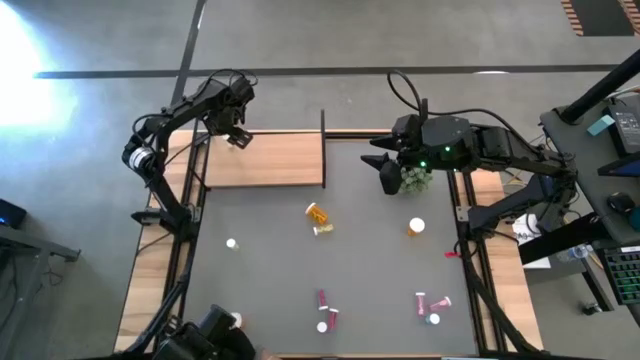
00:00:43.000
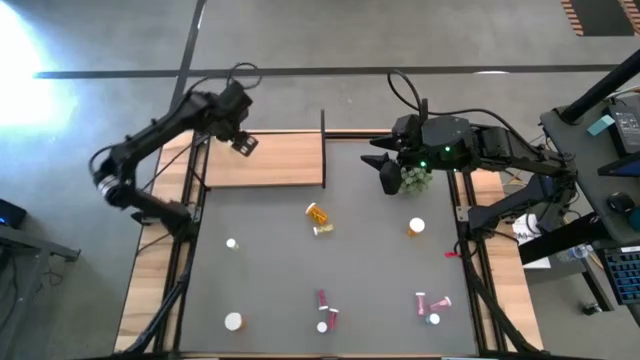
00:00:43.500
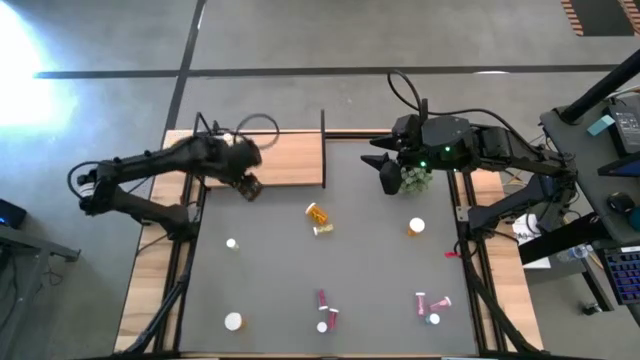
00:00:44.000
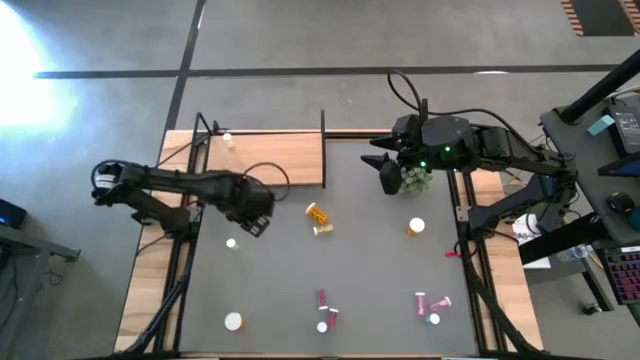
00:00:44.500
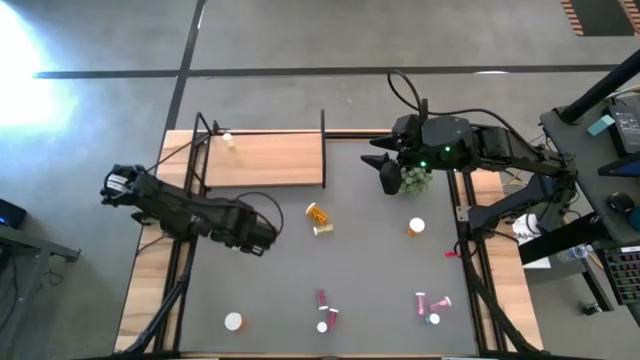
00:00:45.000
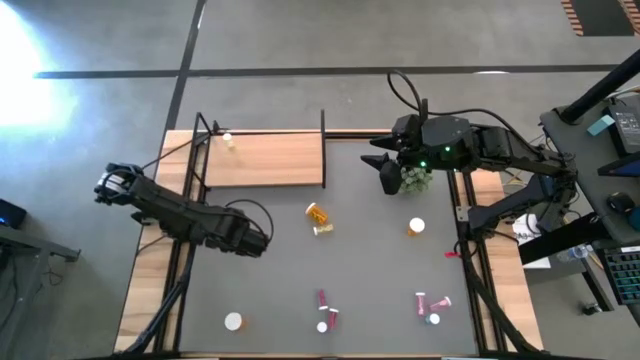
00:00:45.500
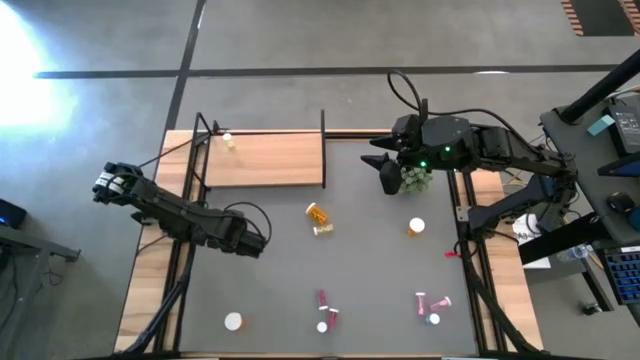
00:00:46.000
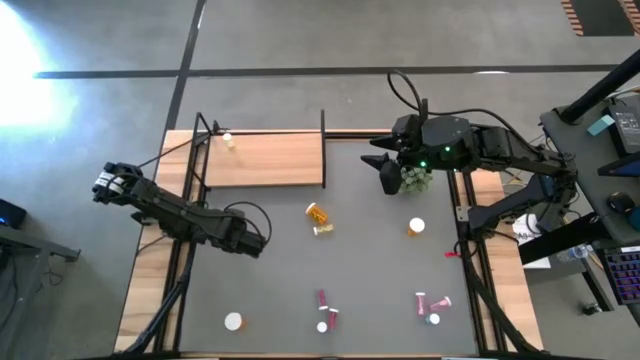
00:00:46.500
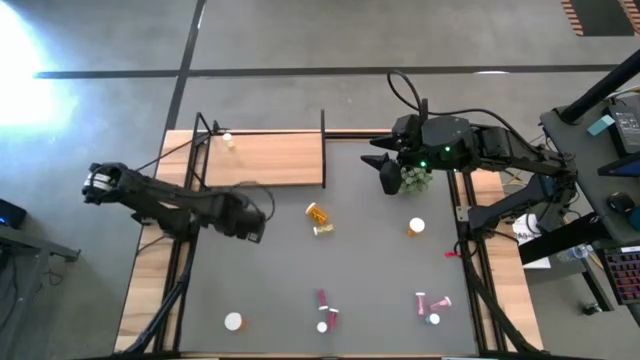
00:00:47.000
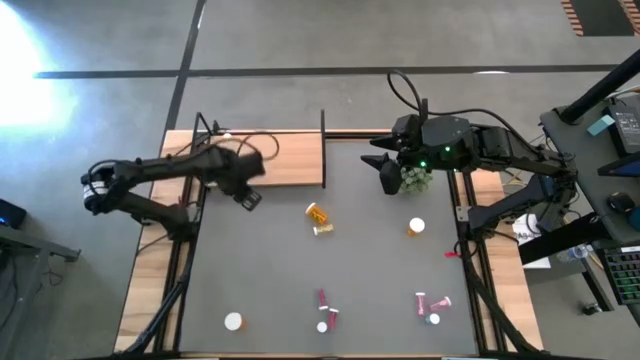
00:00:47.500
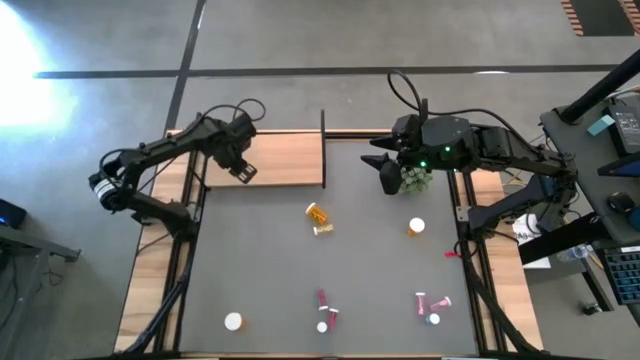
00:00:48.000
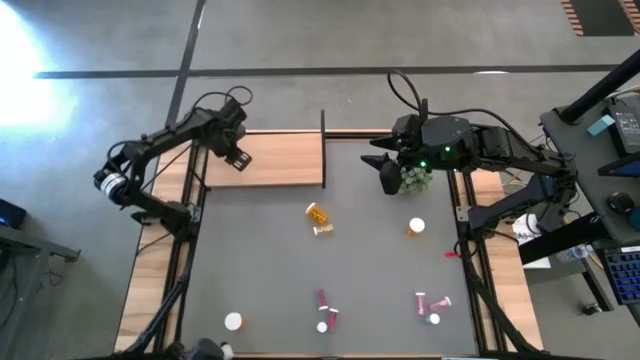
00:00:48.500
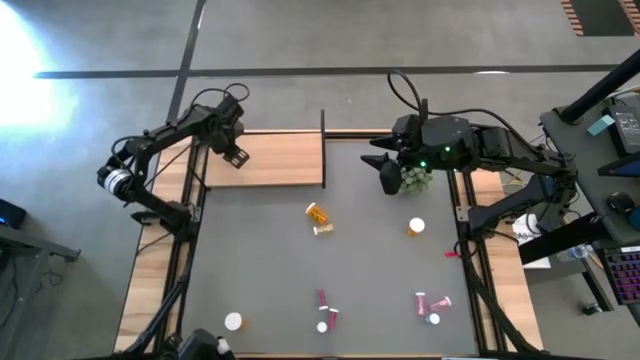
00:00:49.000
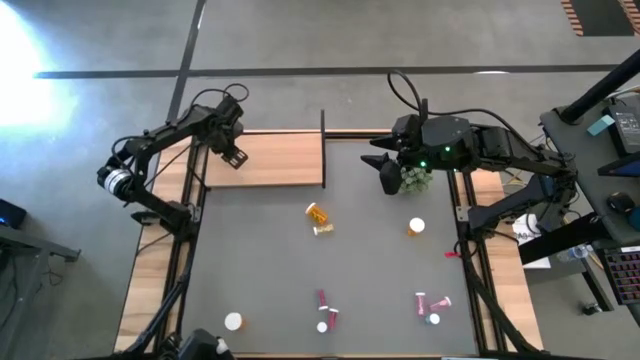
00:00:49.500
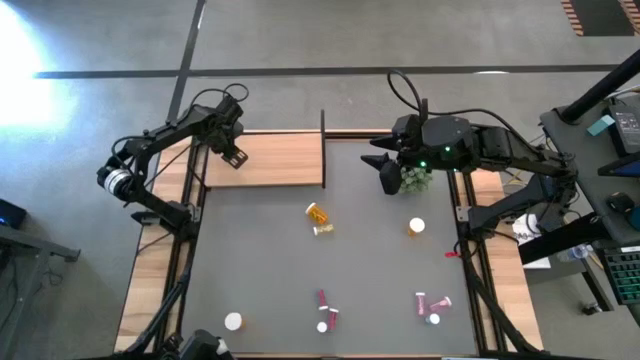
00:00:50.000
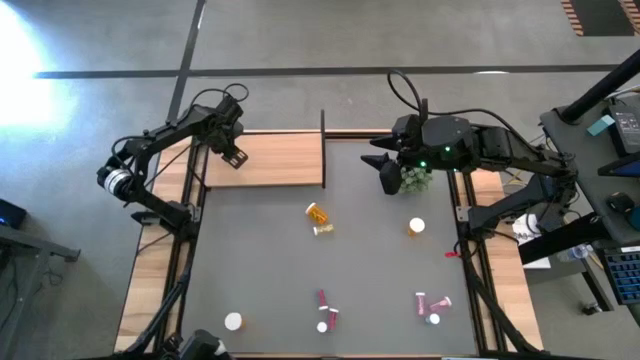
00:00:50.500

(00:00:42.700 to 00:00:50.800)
Task: Pick and place medicine bottles onto shelf by color
Put the left yellow pill bottle on the shelf aligned with the other yellow pill bottle

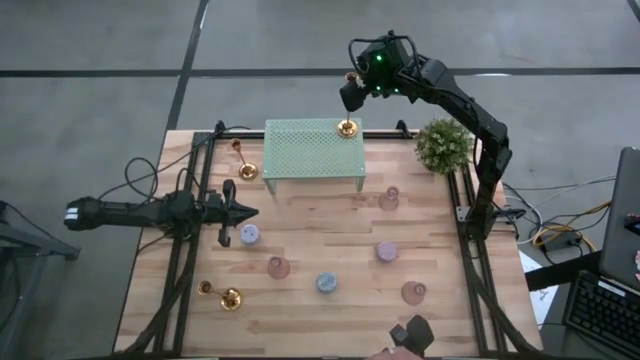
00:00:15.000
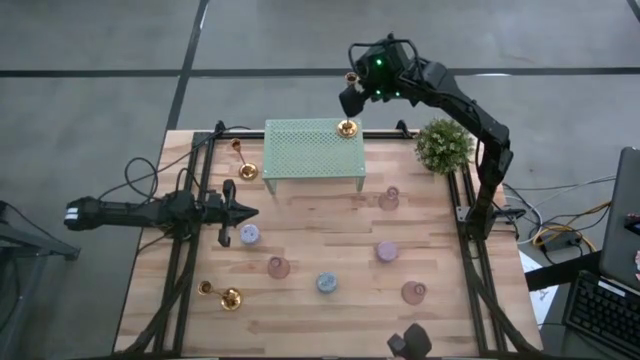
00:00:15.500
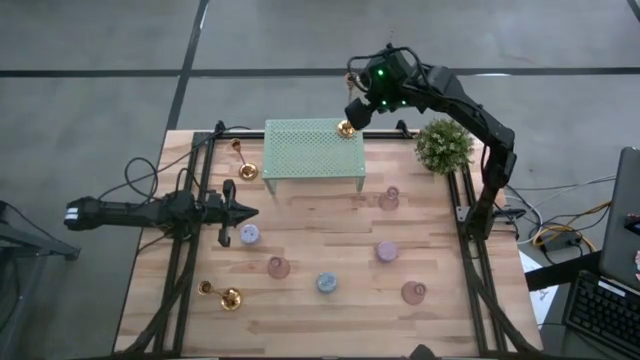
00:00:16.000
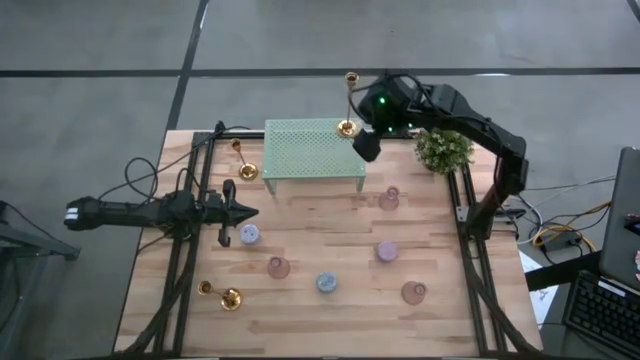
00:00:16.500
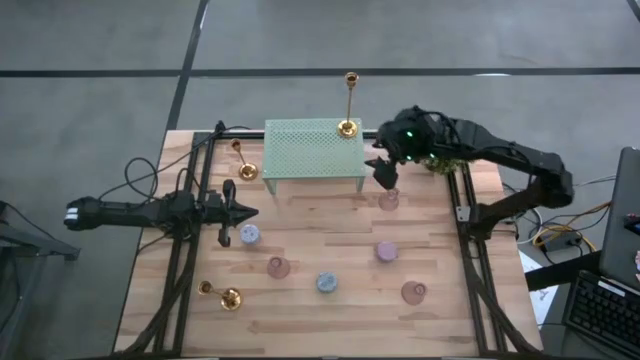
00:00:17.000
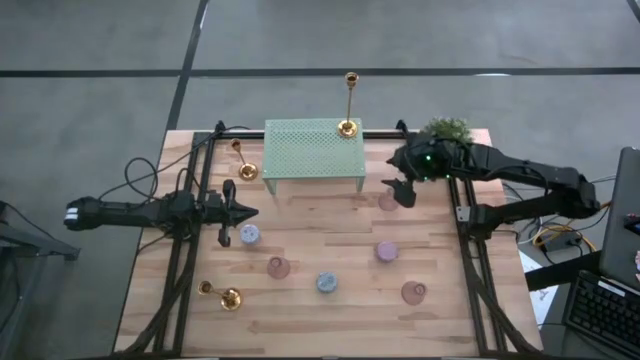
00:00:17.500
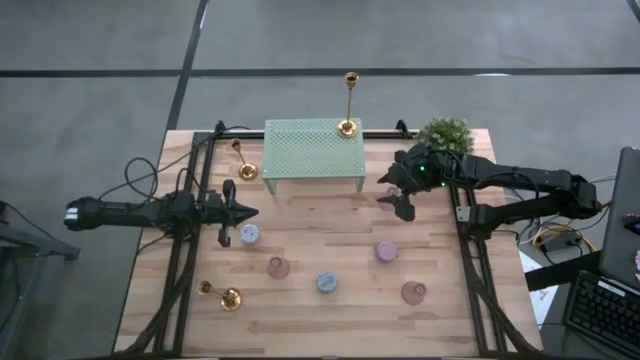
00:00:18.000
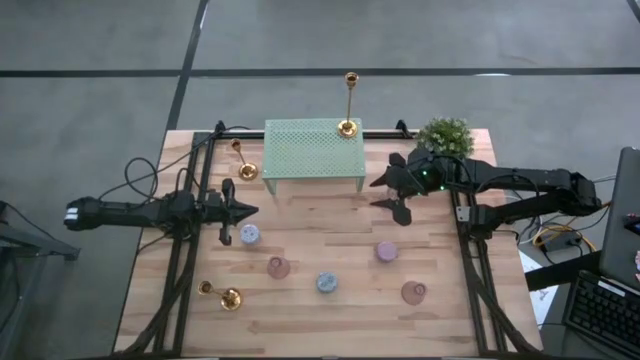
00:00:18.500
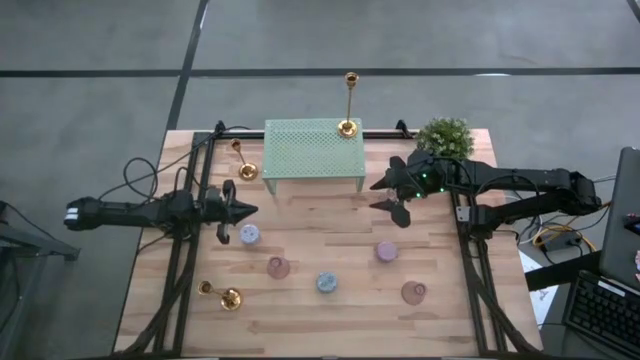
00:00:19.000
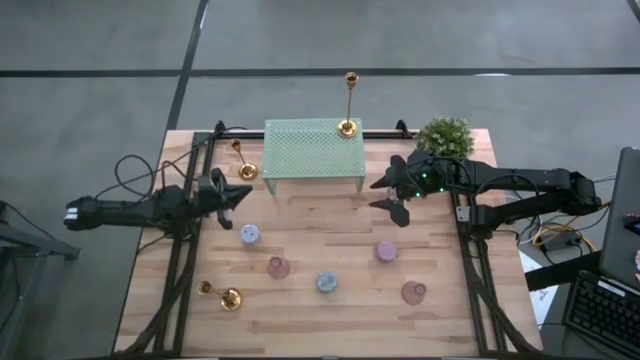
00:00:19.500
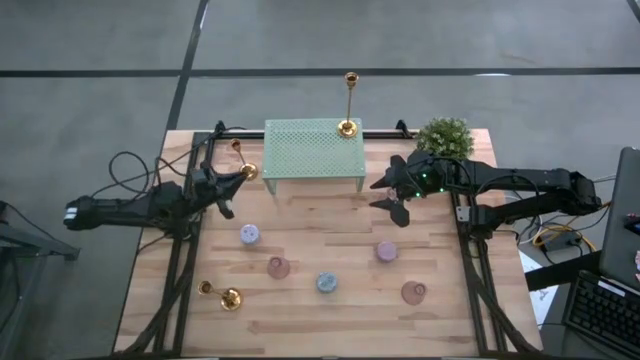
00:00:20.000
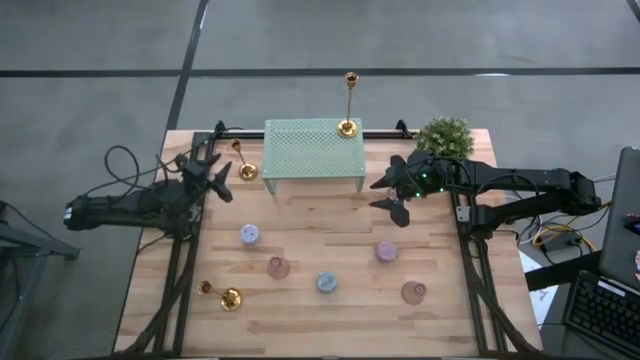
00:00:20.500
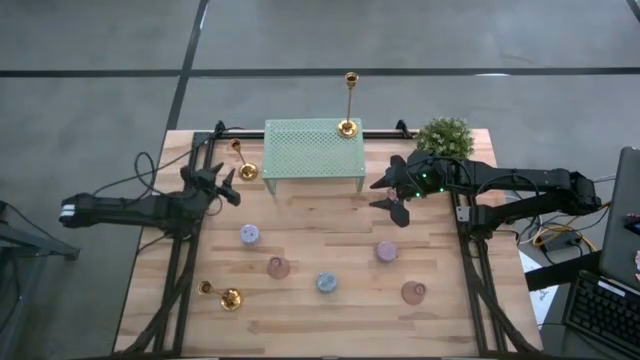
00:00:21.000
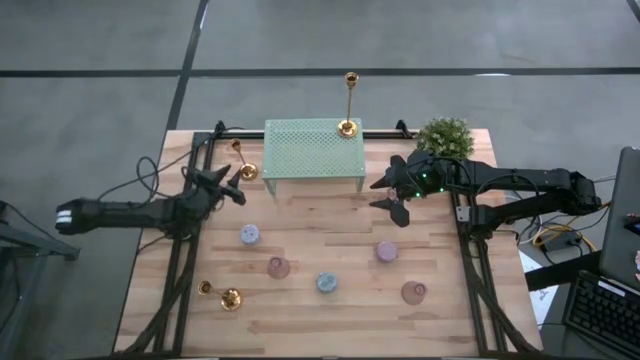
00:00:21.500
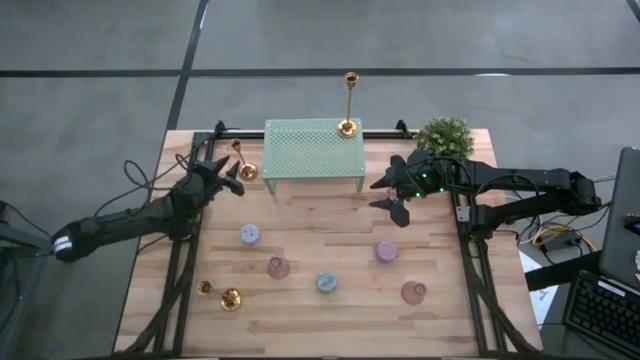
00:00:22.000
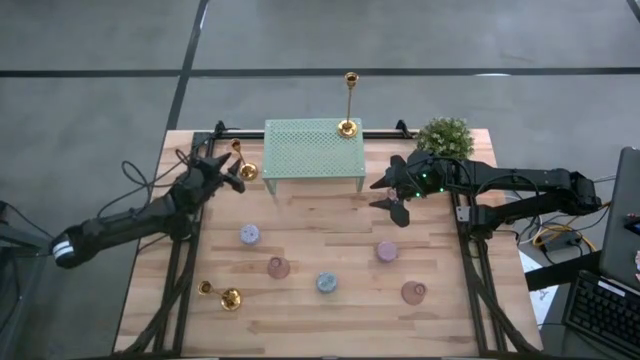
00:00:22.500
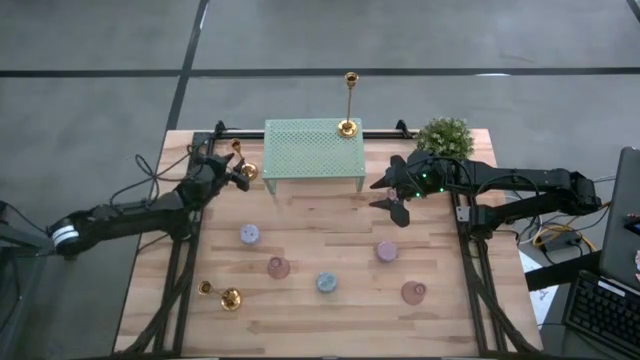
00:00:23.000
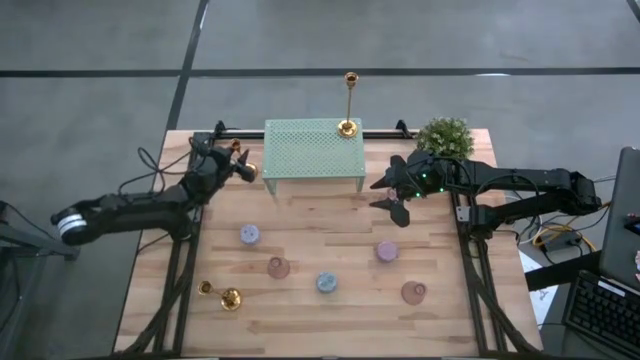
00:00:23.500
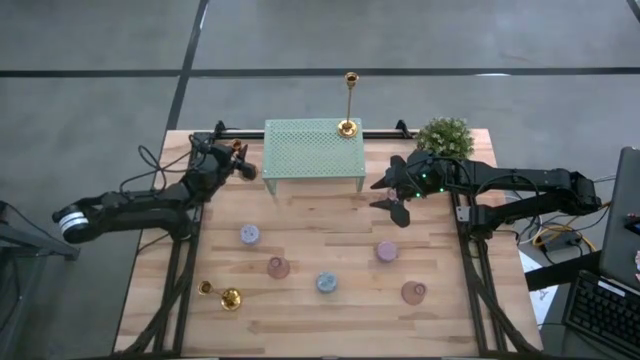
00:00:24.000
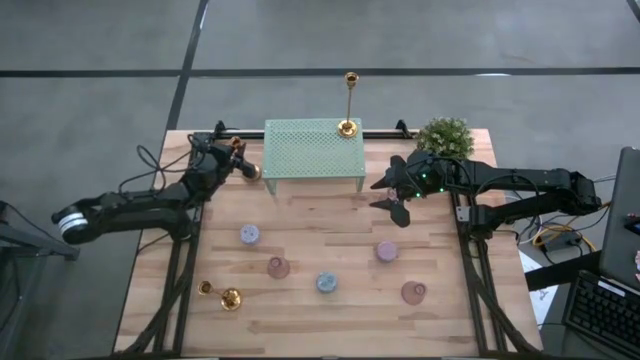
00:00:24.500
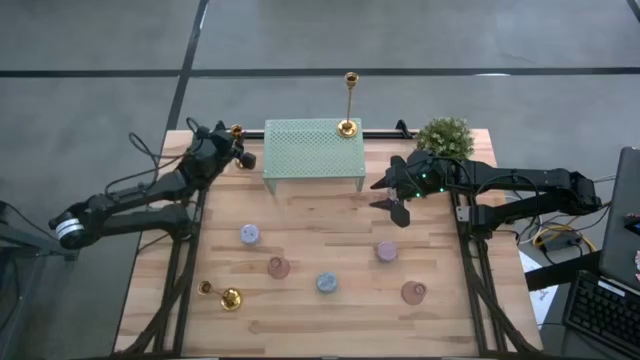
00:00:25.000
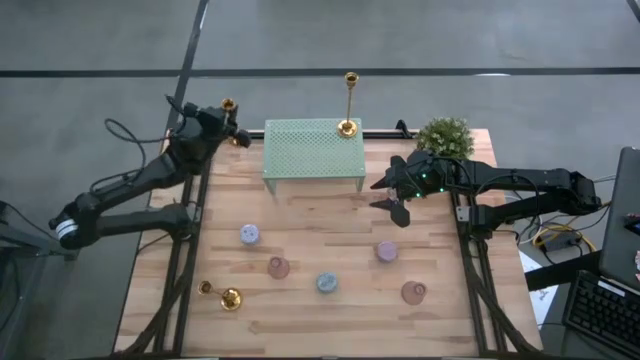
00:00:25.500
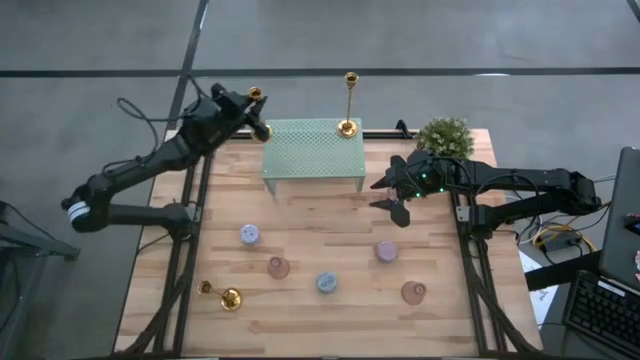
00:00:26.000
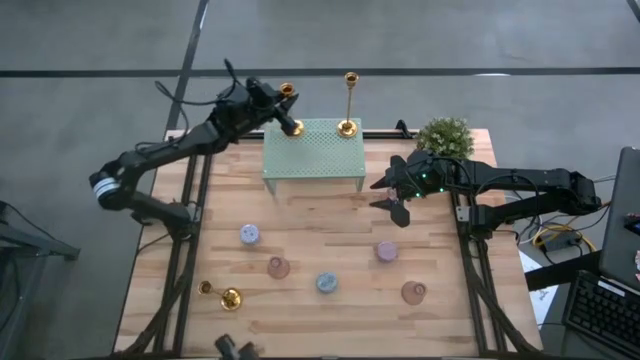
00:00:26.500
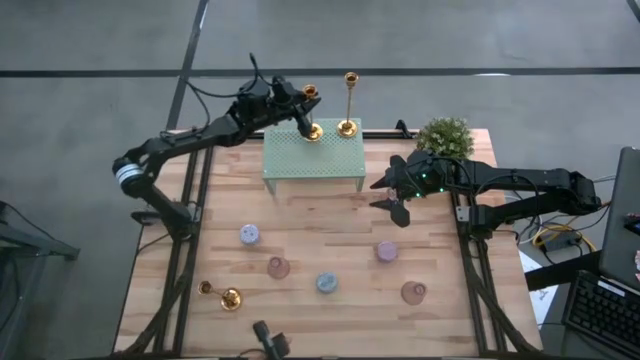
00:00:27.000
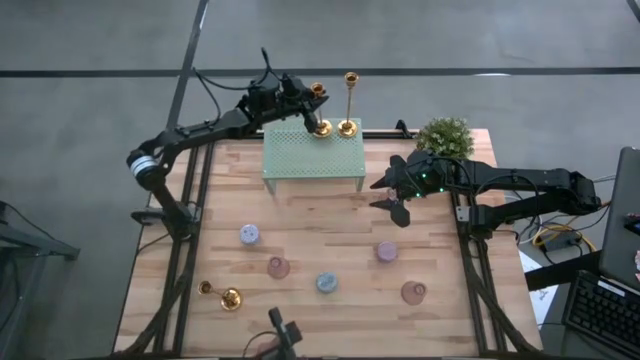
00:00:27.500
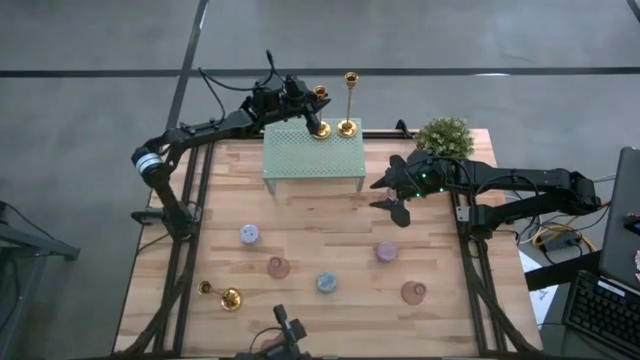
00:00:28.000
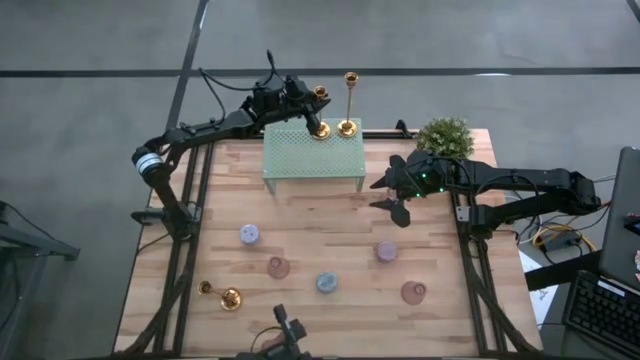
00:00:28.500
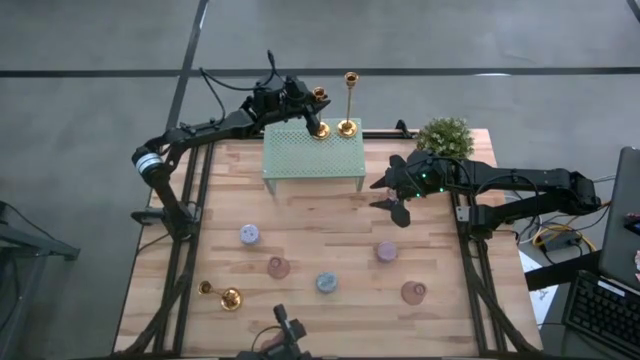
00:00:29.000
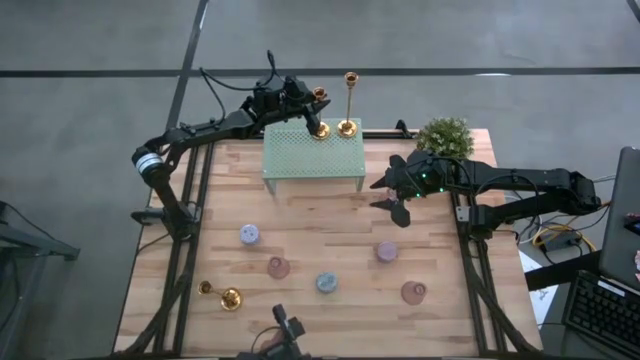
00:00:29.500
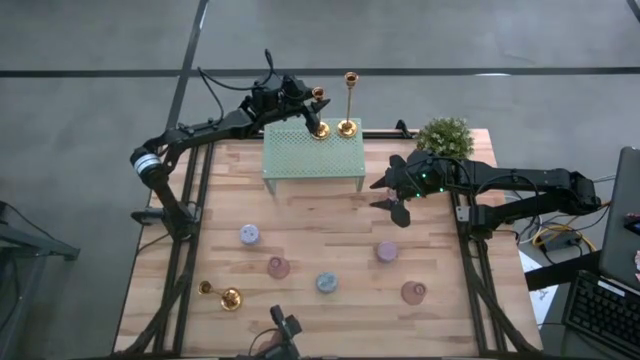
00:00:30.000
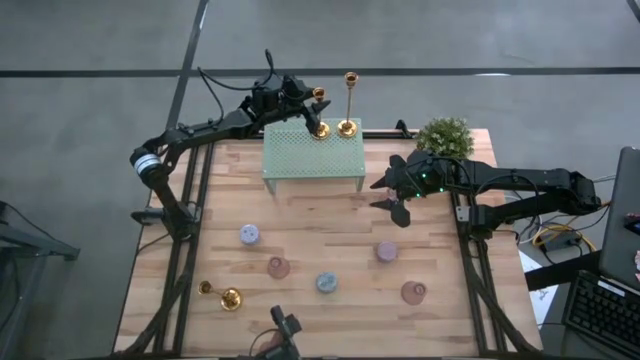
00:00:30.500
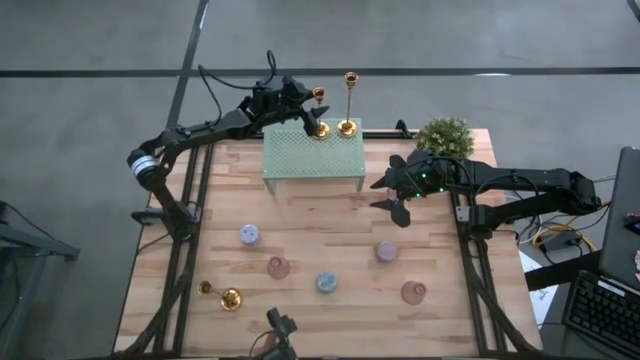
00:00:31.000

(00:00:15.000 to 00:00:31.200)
Task: Pick & Place candle stick holders
Put the top gold candle holder on the shelf
